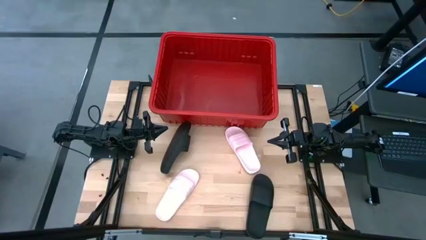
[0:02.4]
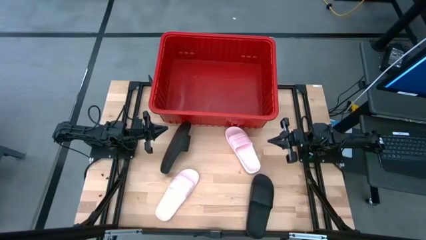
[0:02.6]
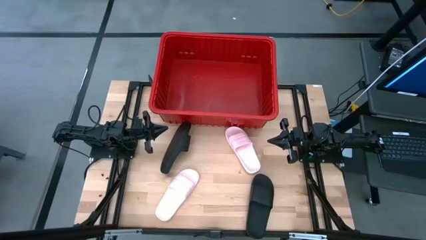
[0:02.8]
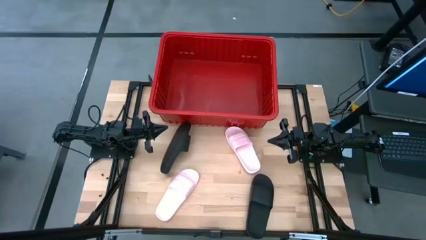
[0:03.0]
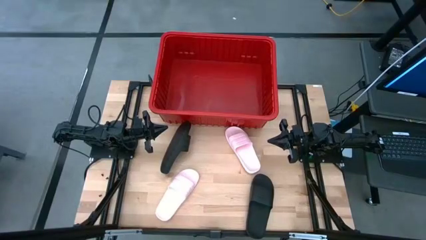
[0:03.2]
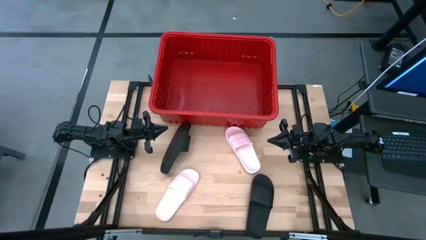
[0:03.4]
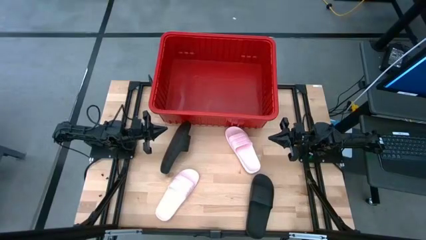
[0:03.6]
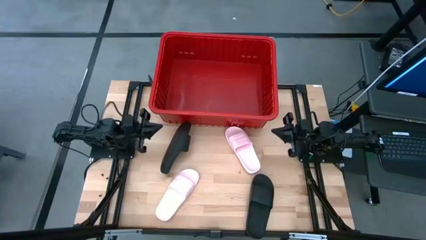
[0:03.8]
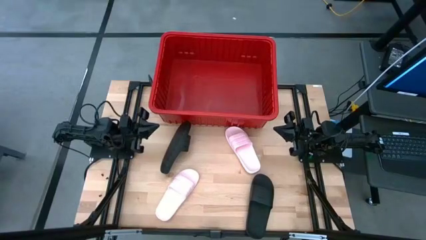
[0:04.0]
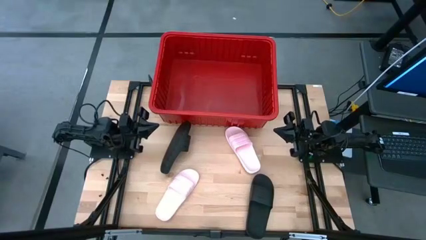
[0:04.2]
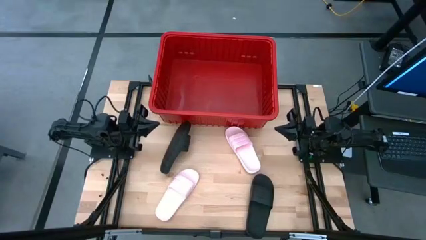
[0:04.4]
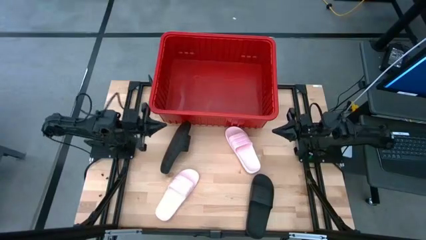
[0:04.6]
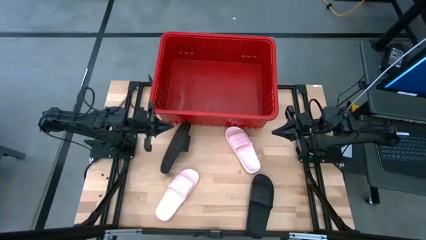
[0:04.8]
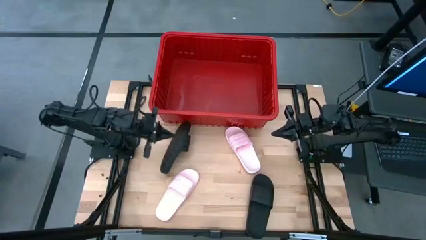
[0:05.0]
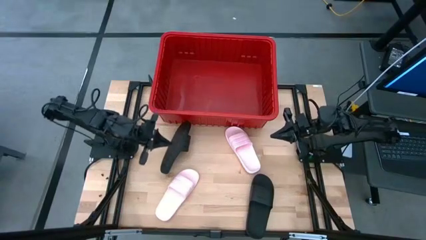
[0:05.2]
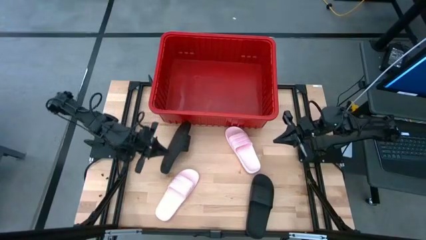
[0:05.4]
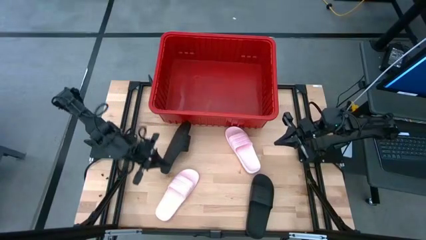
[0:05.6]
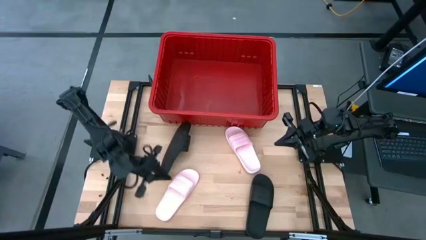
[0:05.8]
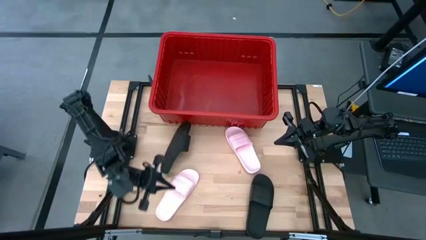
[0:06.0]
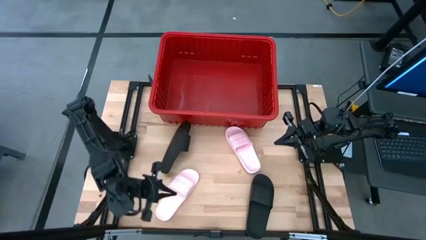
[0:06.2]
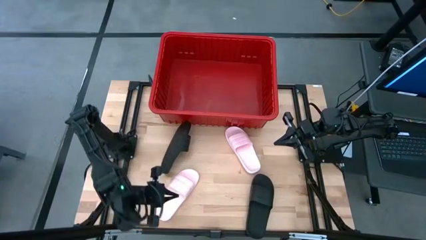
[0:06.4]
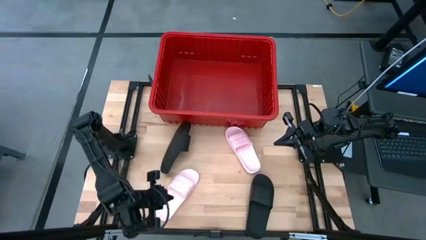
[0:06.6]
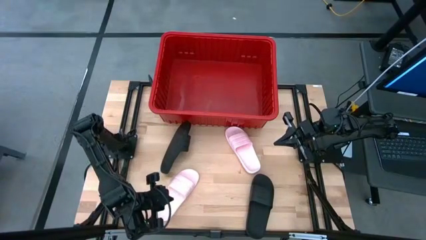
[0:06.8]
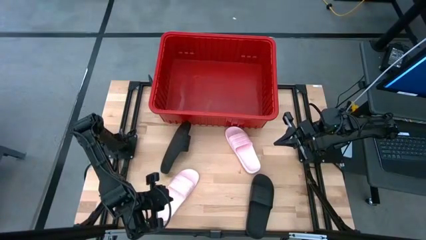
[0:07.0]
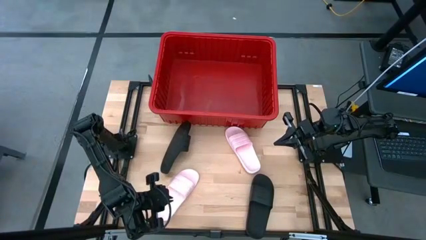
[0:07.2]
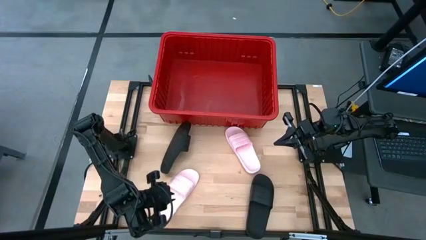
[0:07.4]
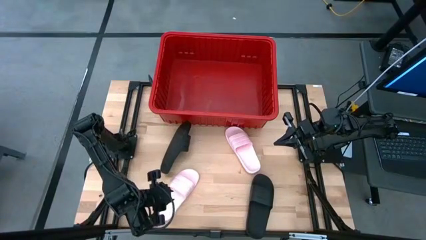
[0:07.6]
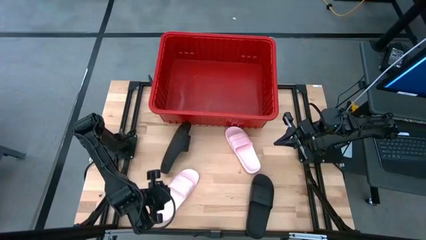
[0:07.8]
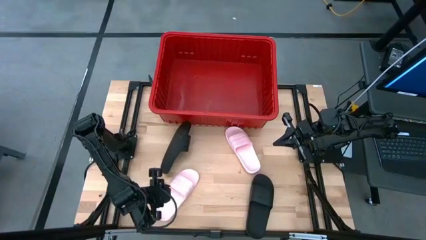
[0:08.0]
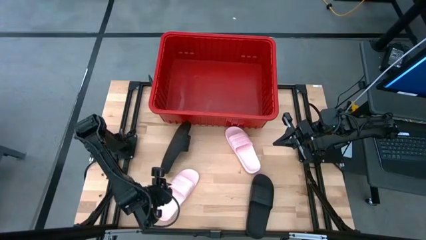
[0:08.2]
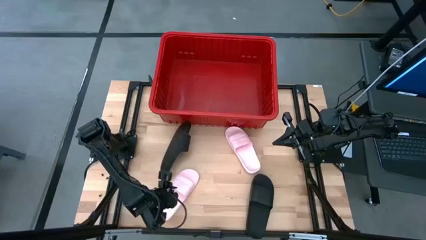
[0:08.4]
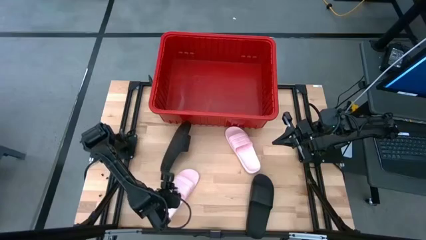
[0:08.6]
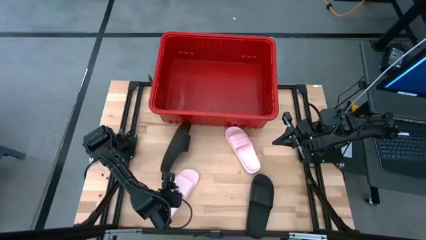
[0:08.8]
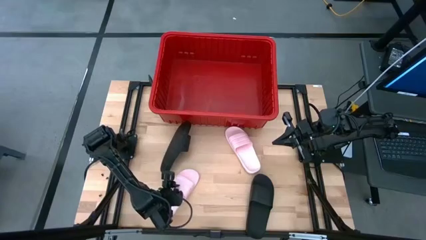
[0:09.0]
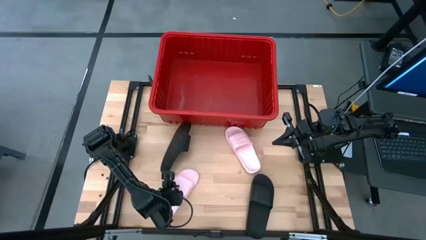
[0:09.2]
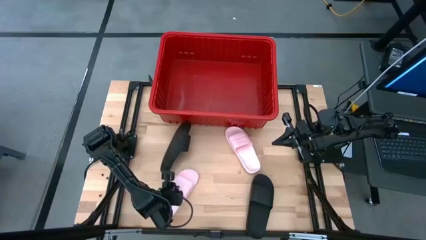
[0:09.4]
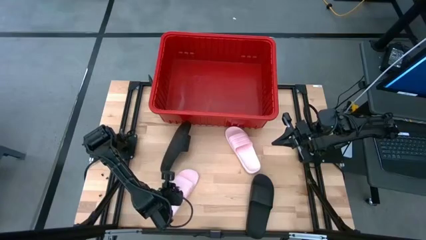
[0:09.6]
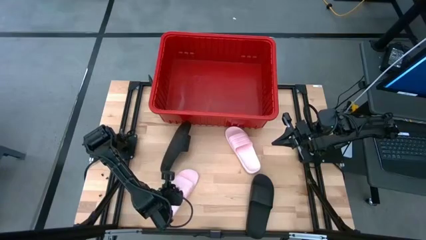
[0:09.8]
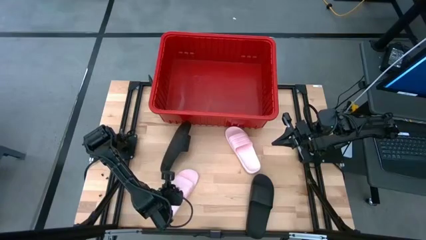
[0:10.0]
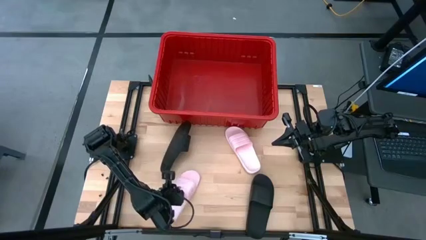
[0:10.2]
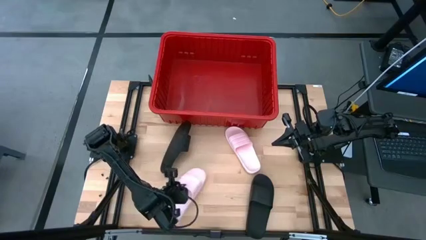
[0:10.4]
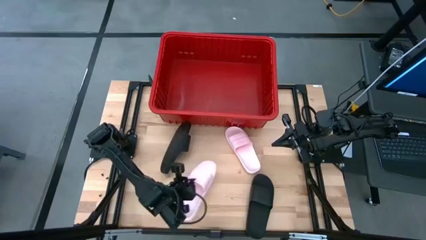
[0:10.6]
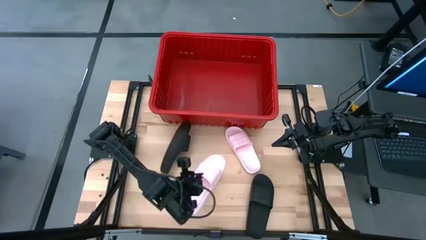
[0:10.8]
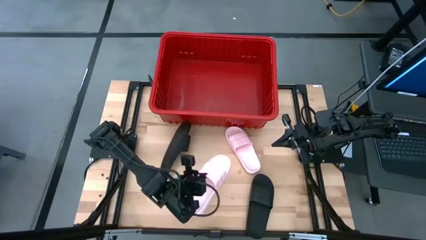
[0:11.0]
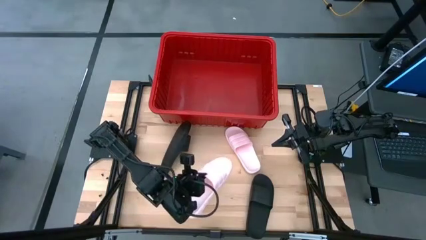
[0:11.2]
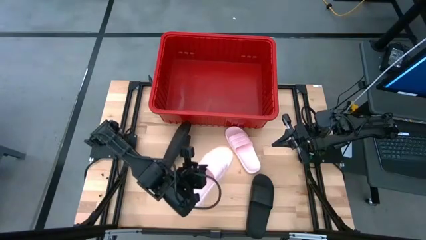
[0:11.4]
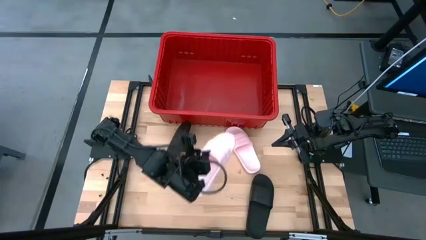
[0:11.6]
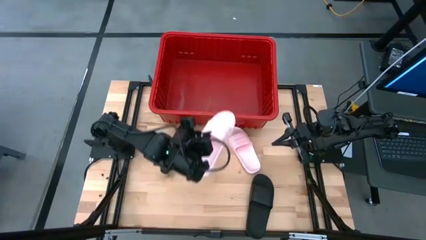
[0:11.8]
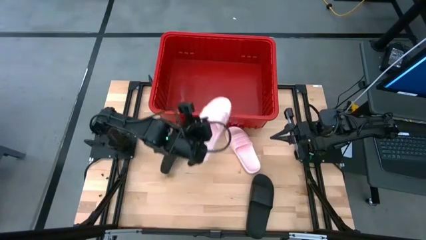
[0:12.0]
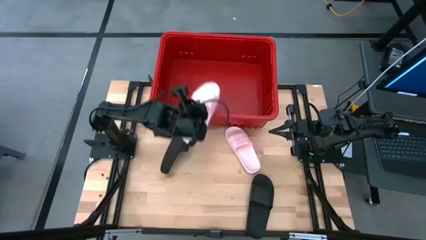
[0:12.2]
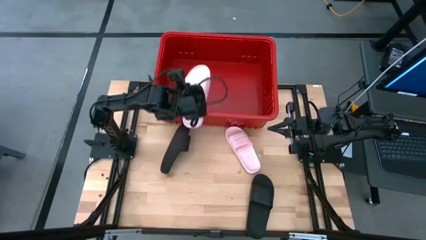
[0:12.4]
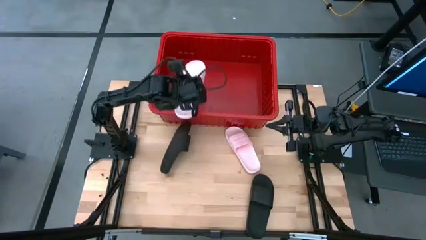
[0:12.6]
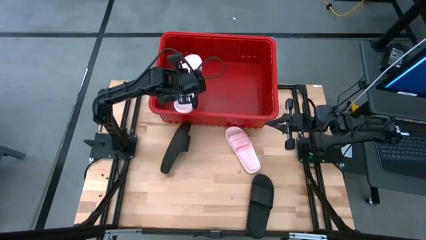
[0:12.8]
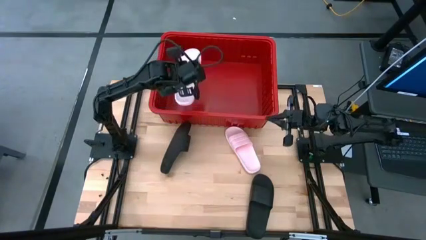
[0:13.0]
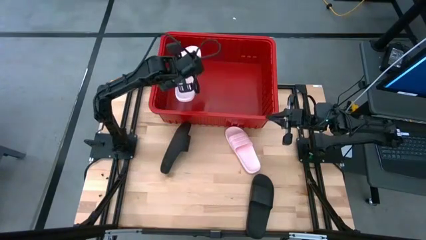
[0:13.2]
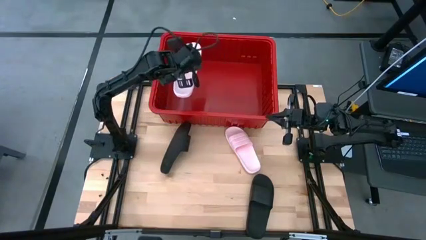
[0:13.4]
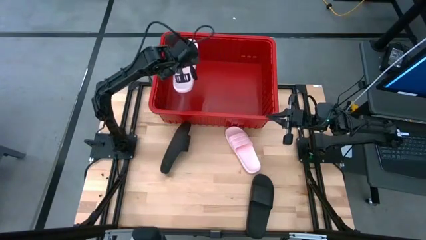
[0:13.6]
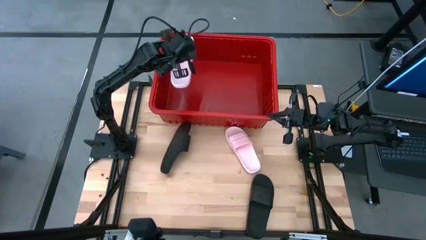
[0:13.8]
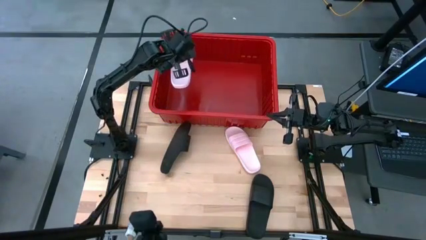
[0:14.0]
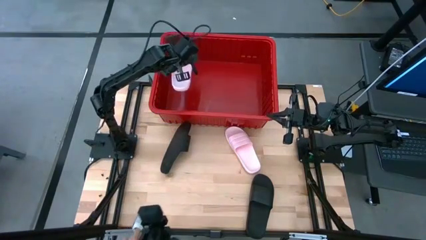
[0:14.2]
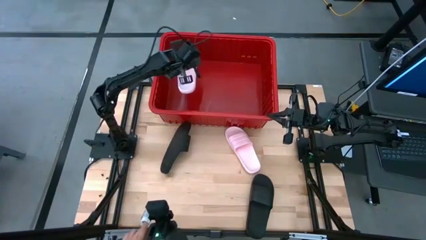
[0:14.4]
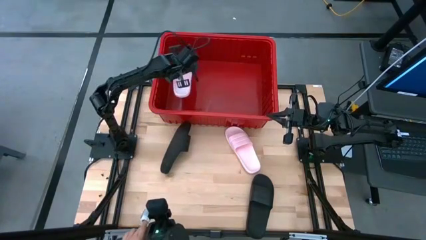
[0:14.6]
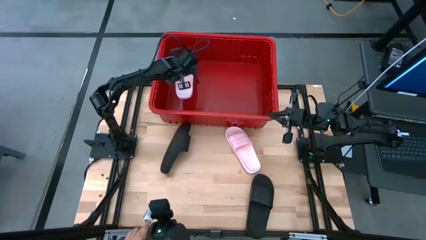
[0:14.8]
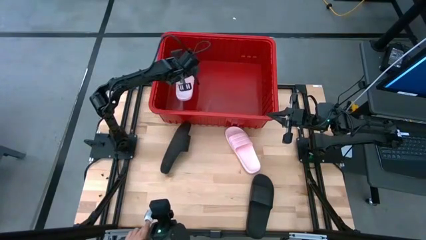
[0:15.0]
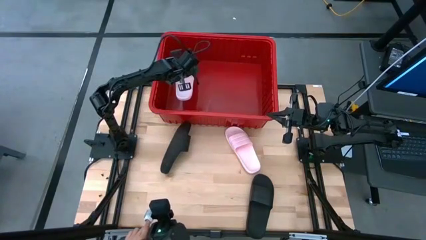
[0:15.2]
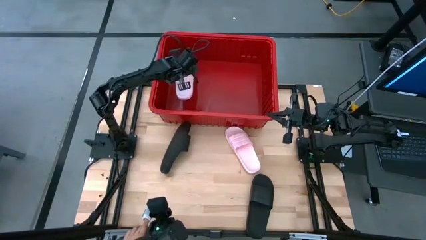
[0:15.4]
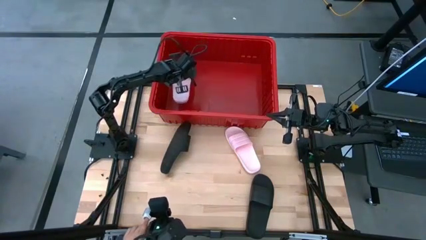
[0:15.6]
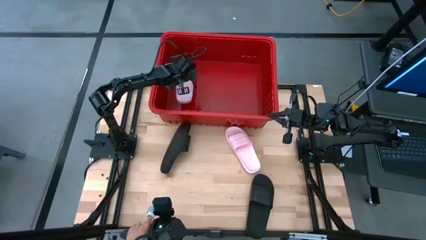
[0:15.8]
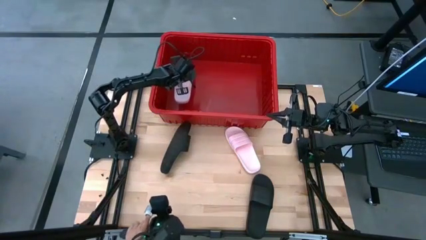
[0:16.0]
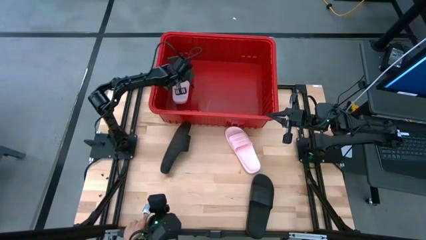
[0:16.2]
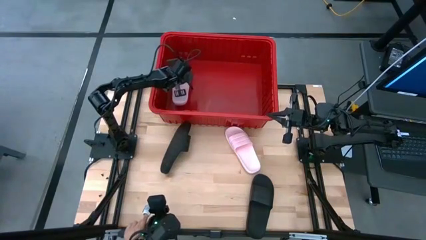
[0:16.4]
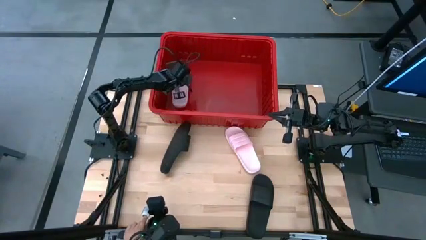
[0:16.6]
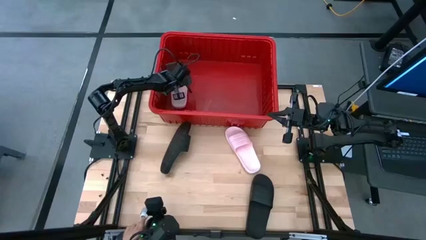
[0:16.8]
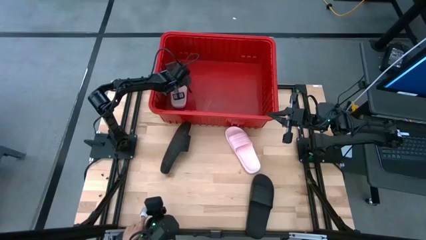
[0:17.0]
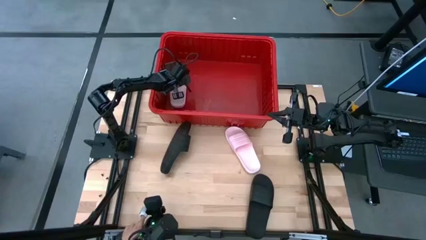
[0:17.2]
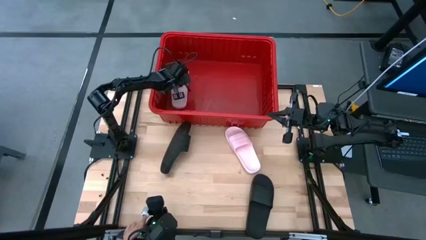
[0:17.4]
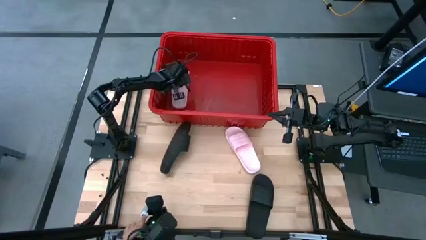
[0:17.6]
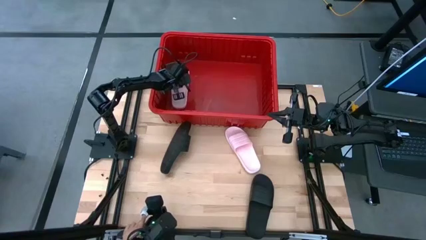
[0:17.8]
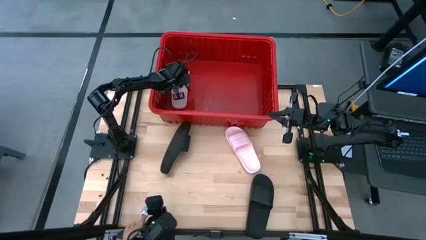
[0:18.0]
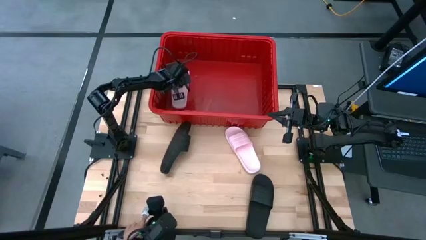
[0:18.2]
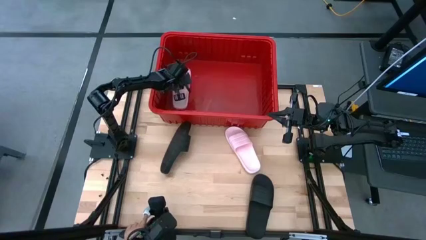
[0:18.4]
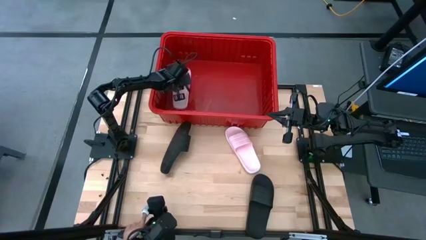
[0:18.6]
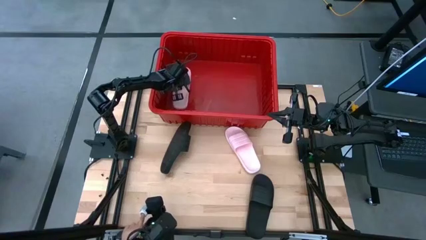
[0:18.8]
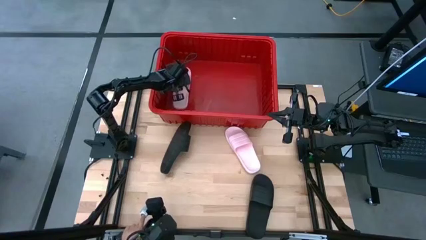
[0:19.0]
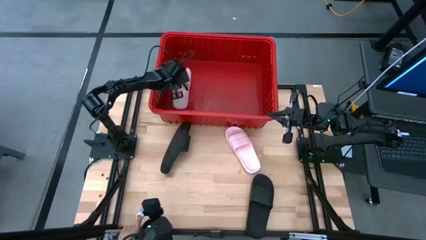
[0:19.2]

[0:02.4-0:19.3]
Task: Pick and place slides into bin
Put the left pink slipper into the red bin
